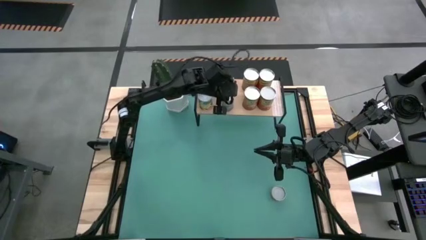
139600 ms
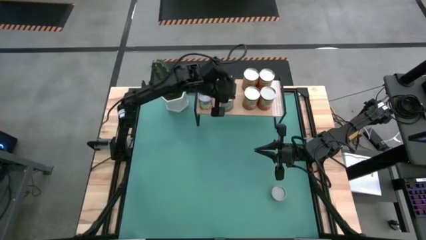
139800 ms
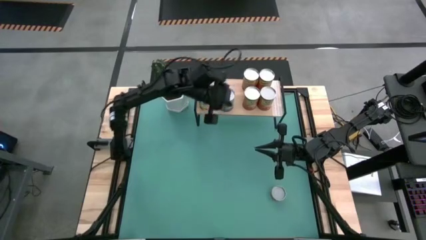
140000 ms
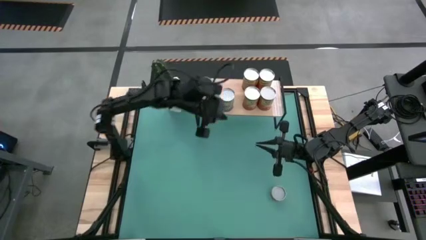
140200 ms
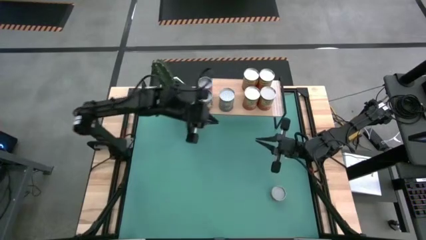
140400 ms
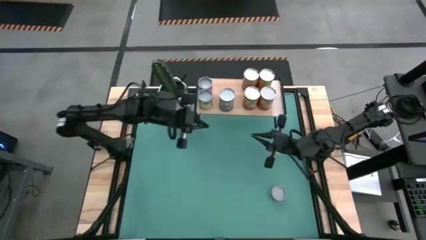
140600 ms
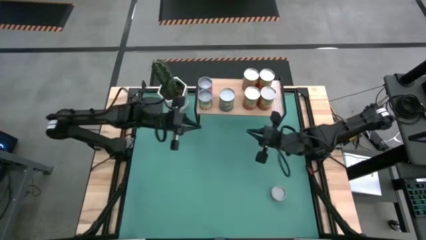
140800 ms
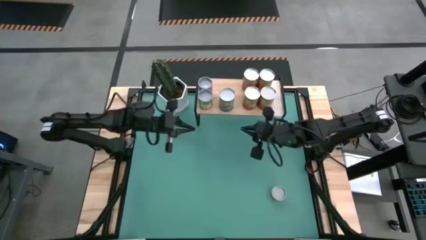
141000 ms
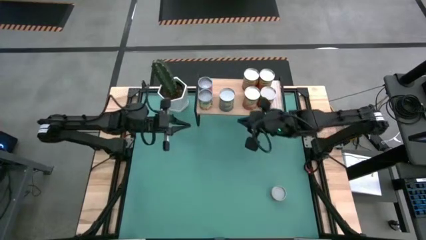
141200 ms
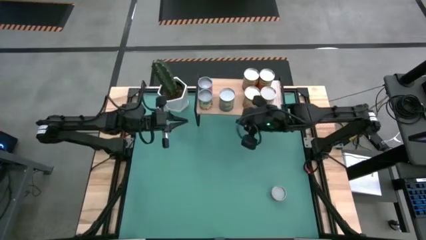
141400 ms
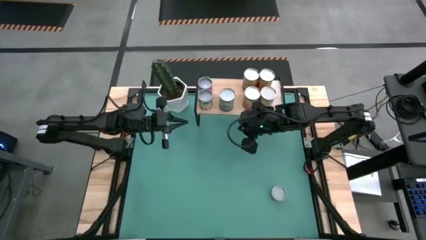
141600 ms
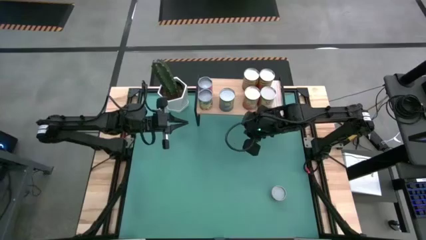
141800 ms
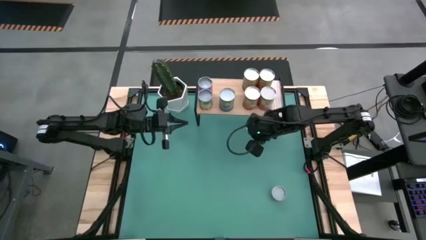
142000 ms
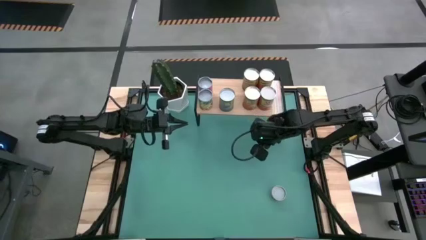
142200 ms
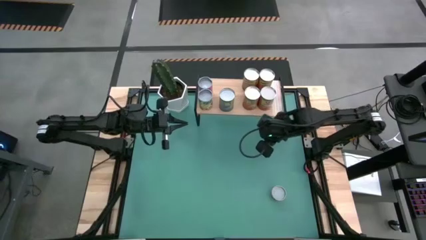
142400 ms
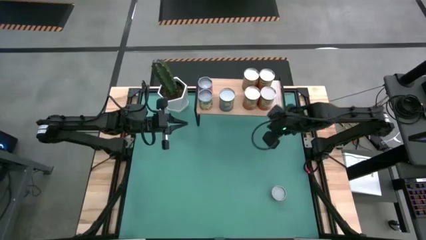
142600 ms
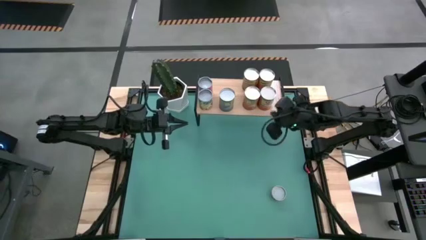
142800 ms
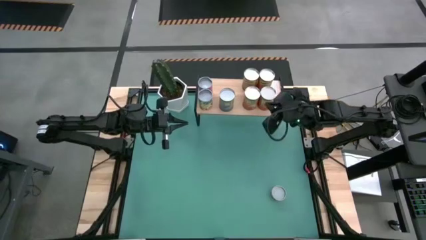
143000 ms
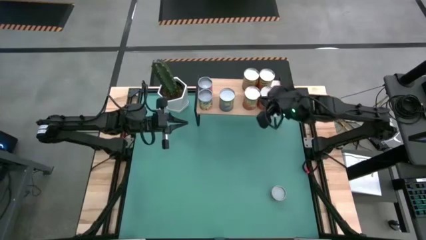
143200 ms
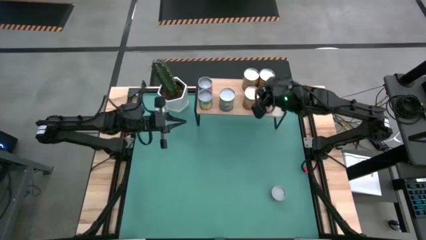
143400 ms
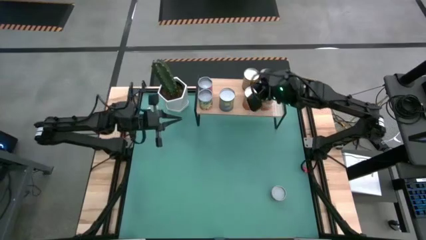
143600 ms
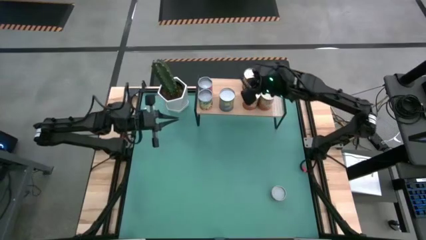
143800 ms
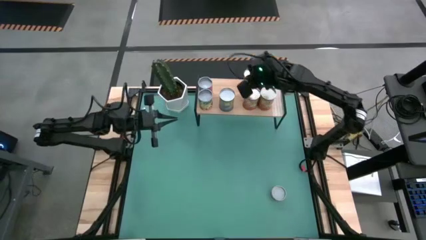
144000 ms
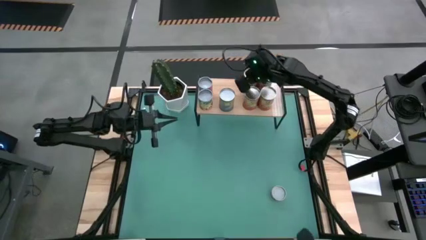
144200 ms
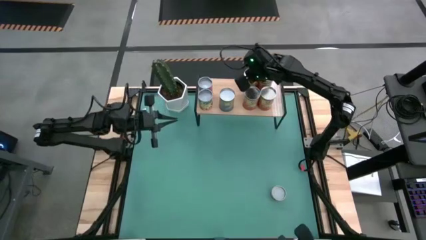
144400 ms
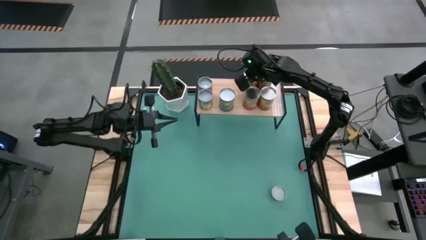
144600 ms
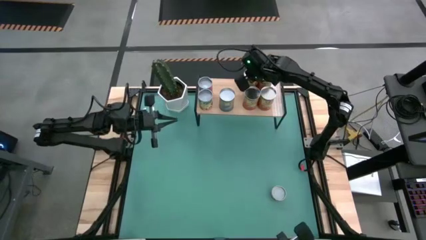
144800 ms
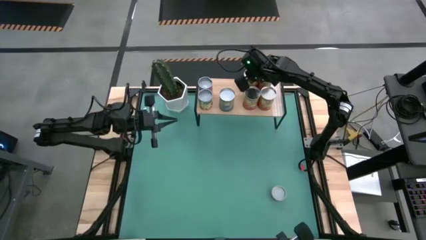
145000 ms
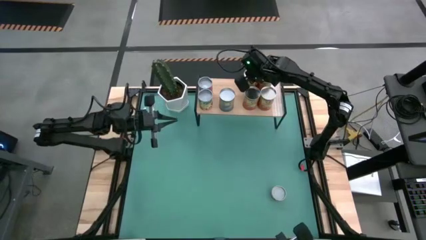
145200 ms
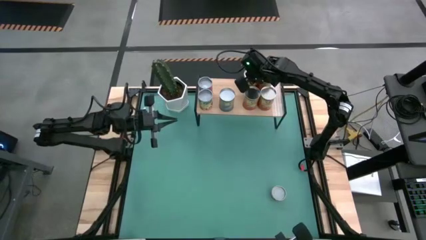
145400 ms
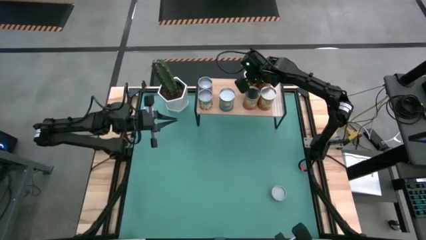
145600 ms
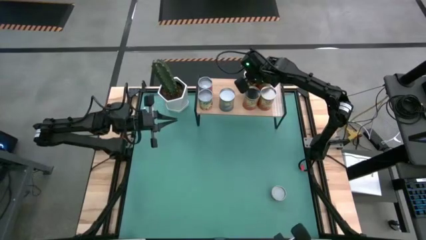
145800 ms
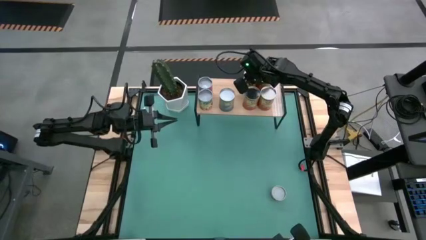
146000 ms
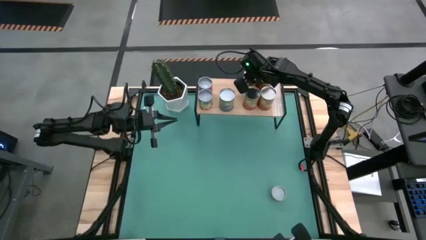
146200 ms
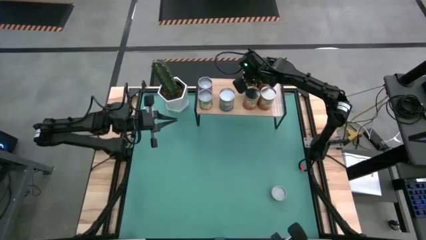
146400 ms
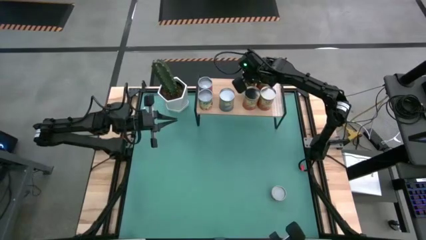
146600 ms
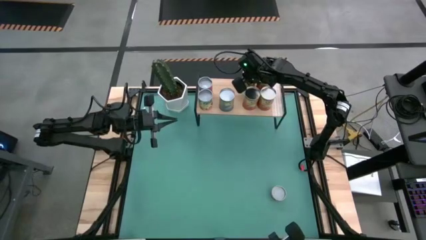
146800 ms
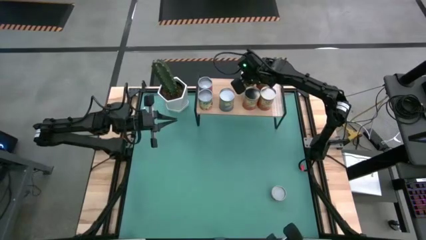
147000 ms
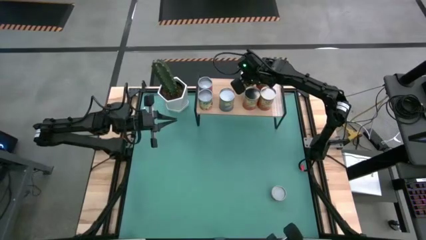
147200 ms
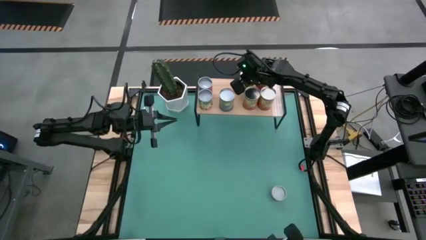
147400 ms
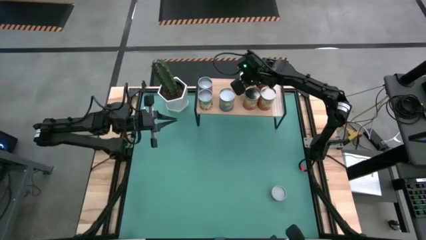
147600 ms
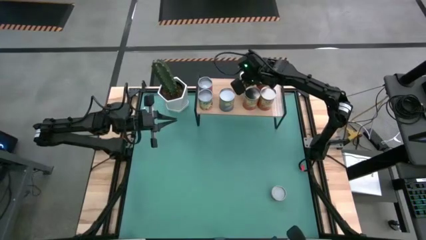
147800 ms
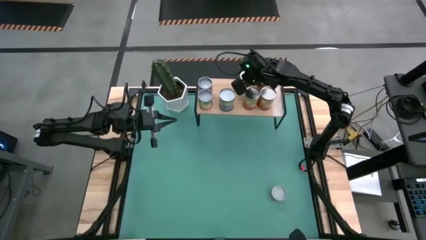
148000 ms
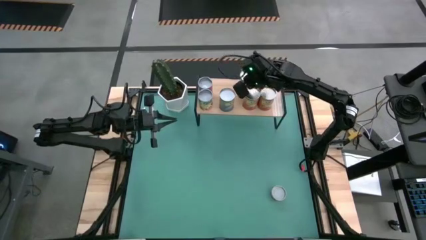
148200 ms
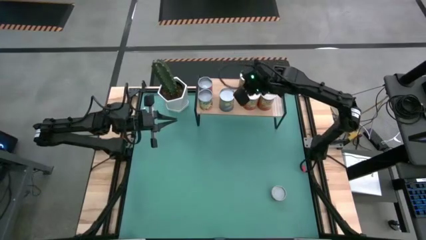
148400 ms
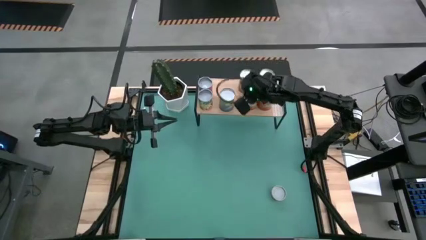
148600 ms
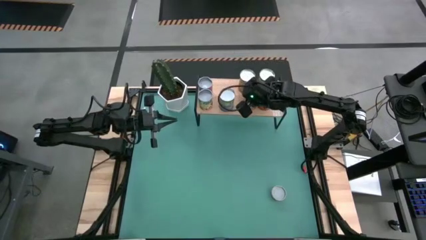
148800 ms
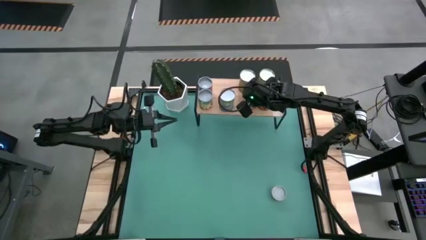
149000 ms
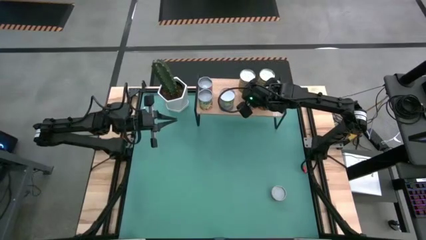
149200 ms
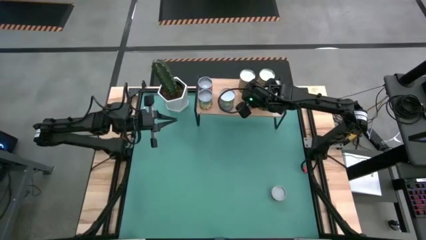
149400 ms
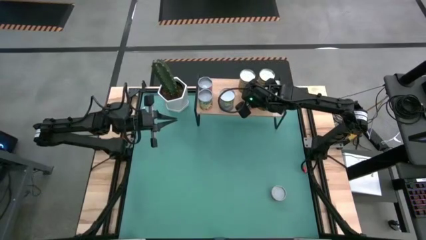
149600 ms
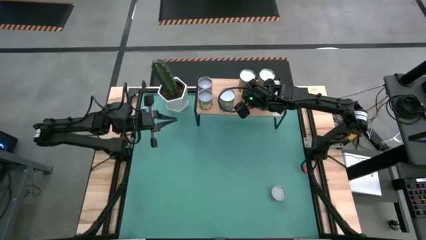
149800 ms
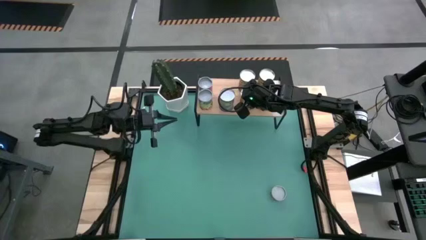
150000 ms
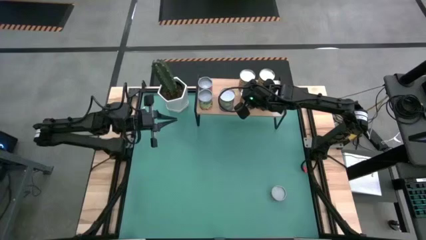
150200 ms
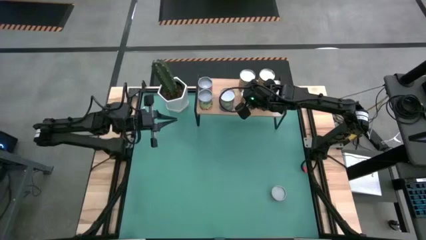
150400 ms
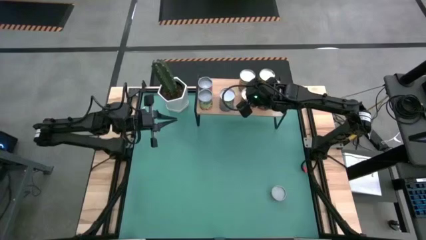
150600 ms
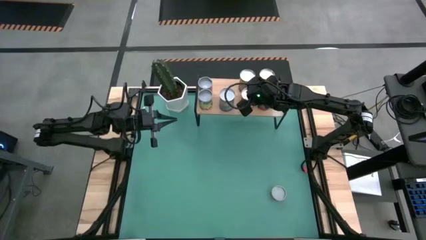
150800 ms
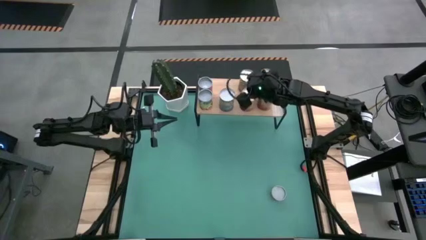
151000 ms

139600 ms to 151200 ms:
Task: Pick and place cans onto a shelf
Adjust the cans on the shelf

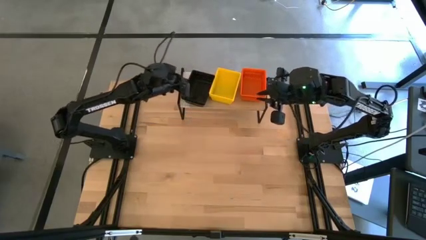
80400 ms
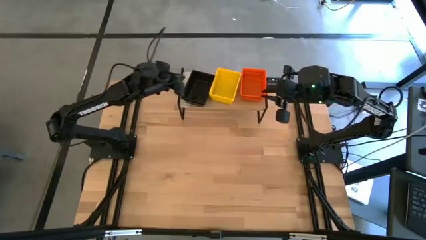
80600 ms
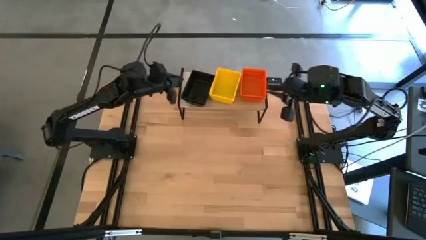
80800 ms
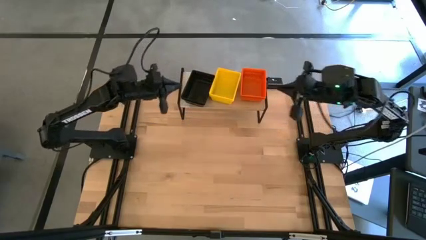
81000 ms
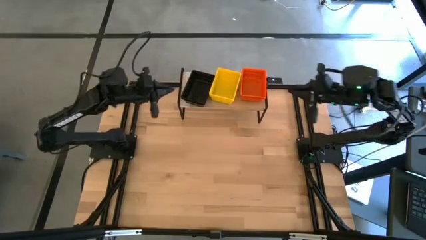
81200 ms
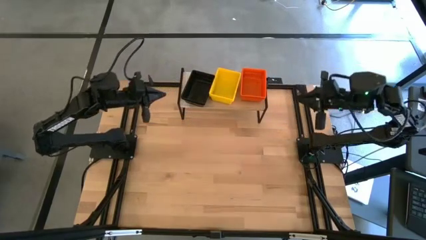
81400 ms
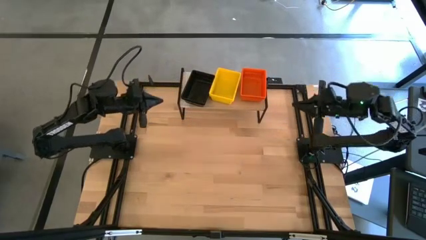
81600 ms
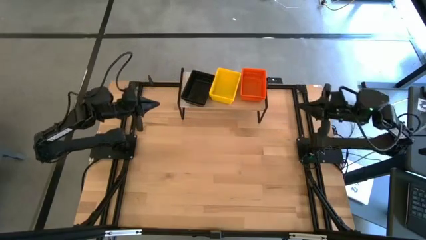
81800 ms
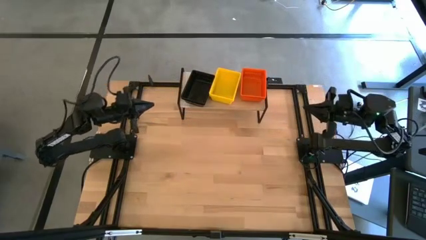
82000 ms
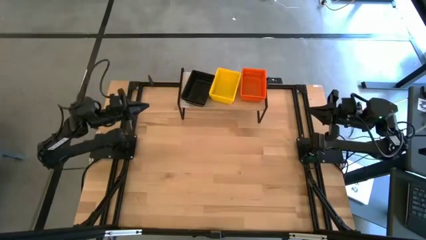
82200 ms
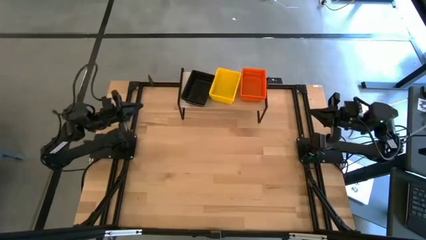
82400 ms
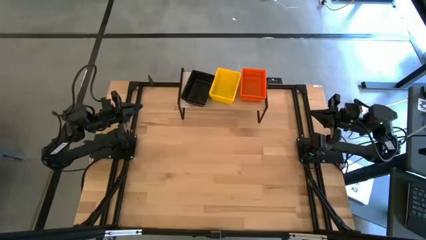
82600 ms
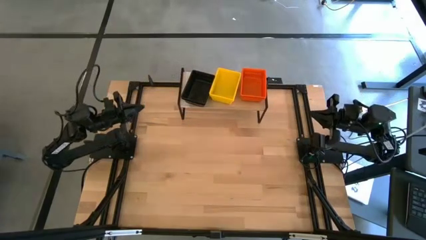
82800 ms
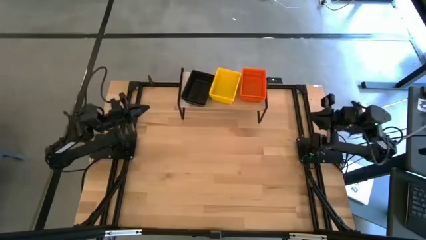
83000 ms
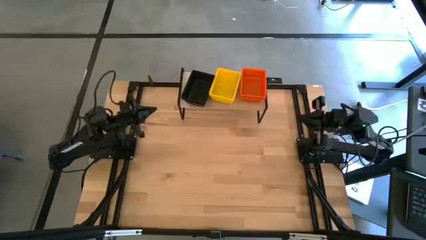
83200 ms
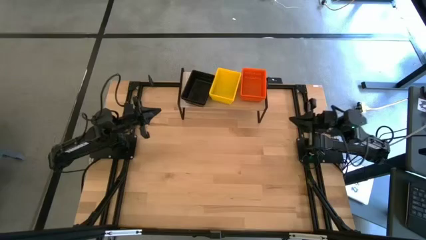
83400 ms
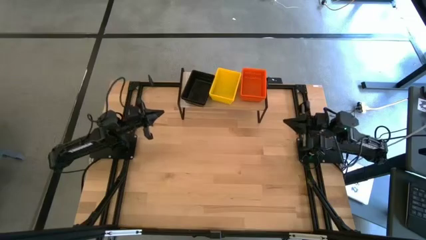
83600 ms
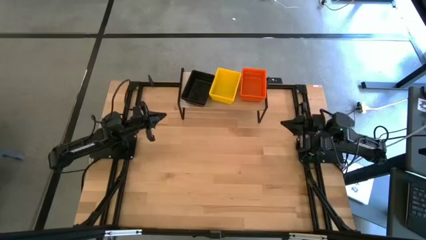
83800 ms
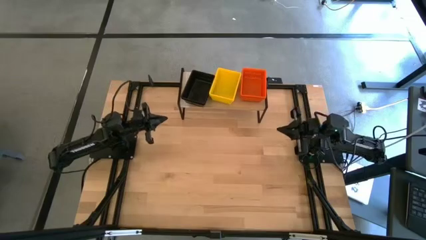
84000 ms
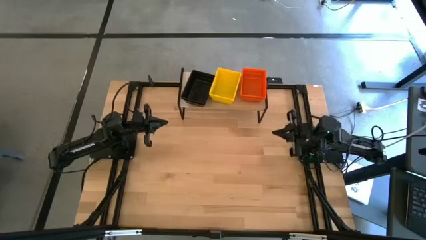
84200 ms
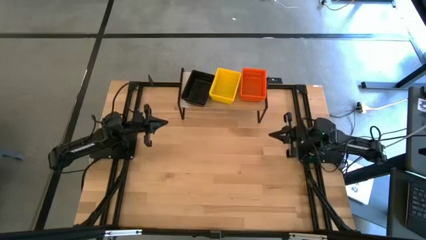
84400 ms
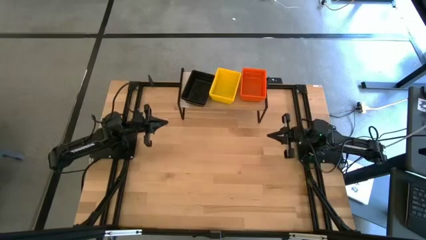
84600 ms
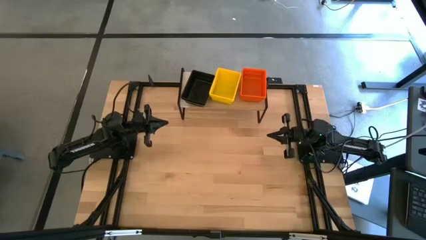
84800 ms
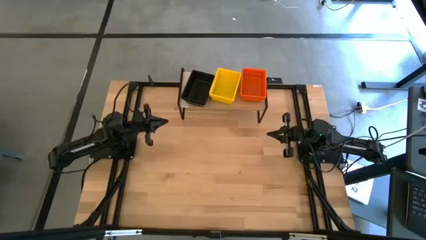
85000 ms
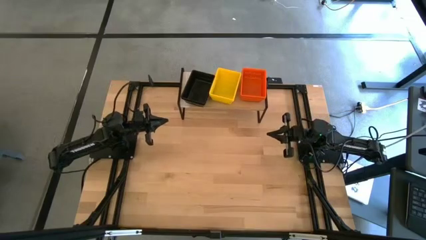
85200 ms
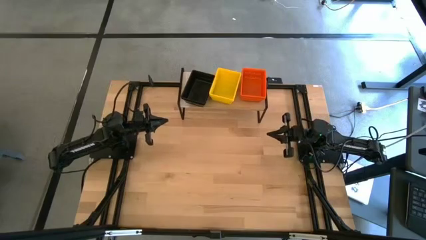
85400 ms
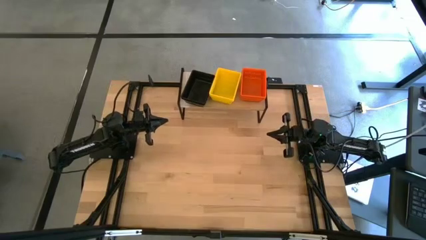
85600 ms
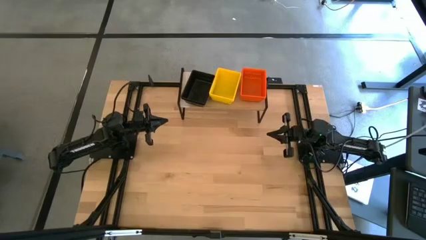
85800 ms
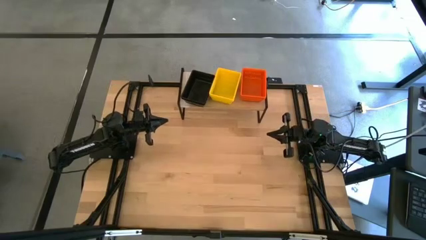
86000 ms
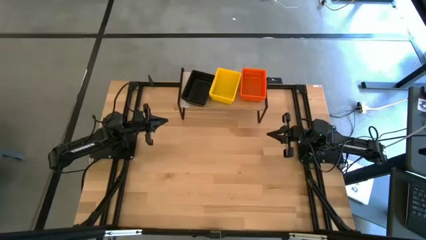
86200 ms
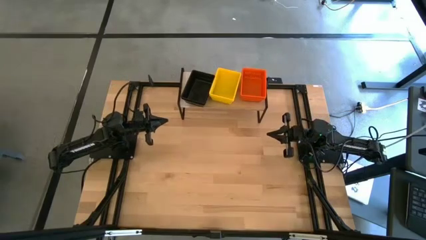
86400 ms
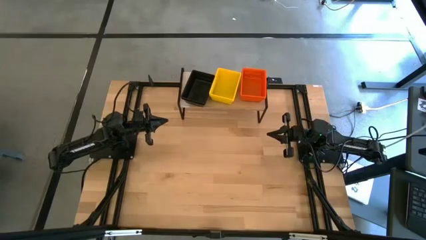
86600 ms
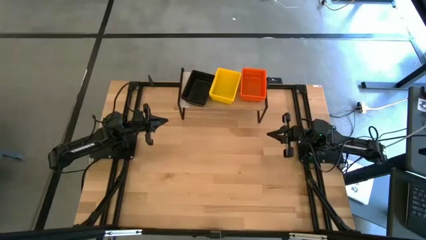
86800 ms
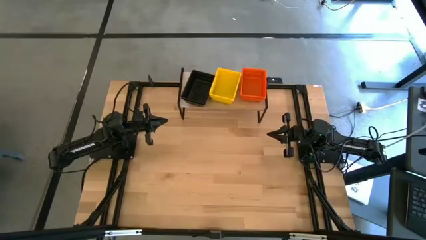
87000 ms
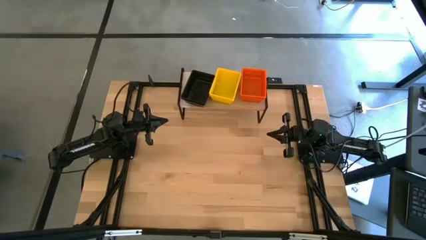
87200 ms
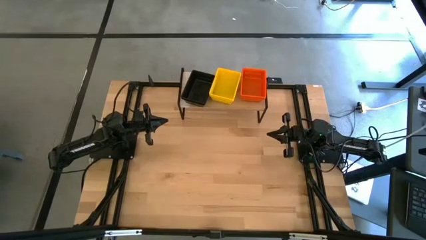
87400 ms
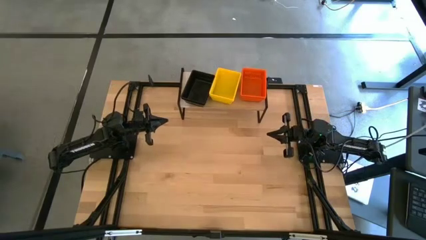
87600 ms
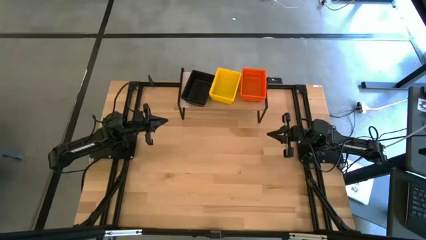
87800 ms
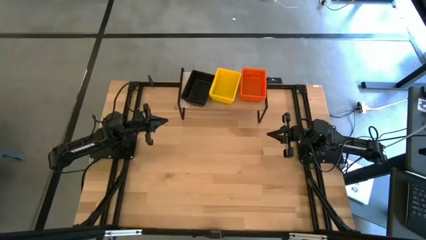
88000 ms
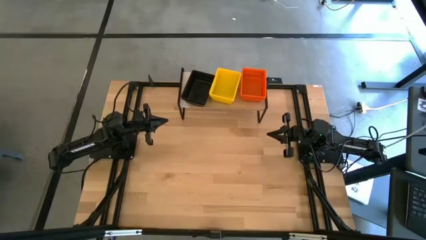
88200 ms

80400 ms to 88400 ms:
Task: Stack baskets on shelf by color
Return to Home Position
